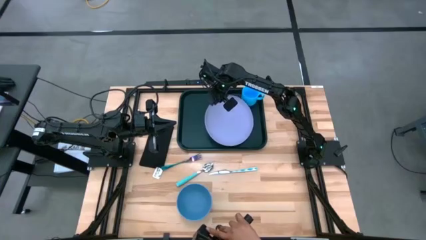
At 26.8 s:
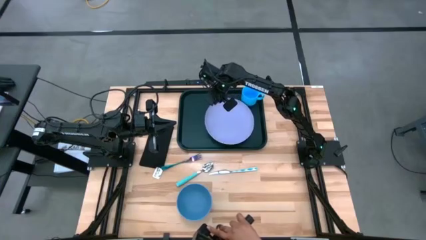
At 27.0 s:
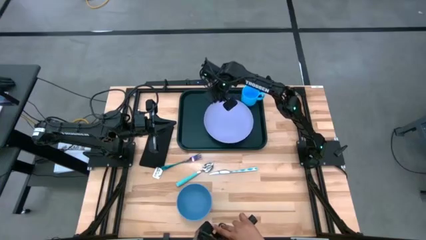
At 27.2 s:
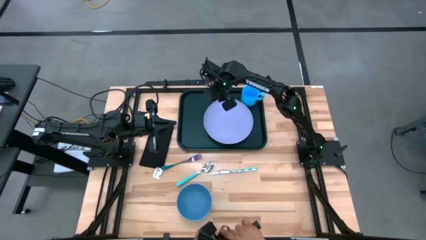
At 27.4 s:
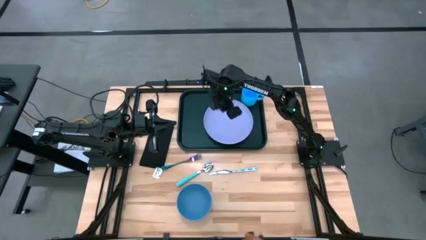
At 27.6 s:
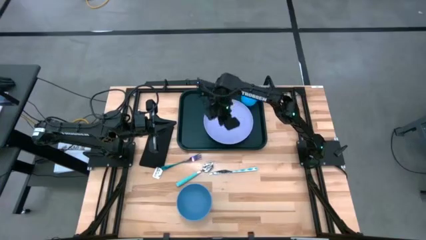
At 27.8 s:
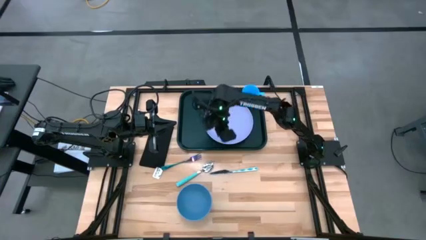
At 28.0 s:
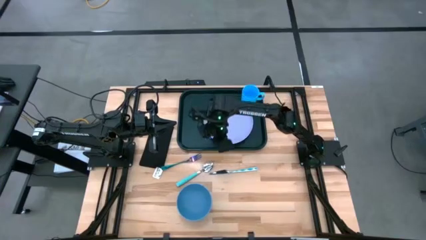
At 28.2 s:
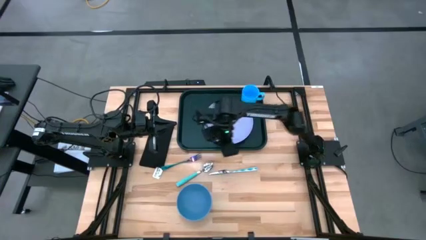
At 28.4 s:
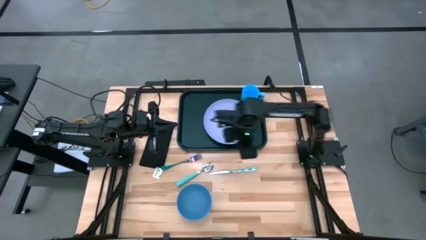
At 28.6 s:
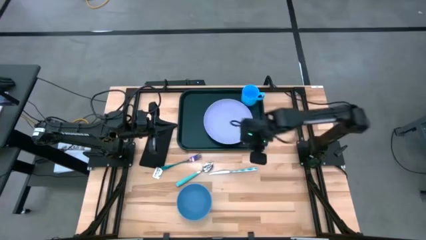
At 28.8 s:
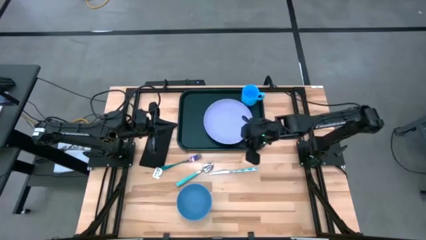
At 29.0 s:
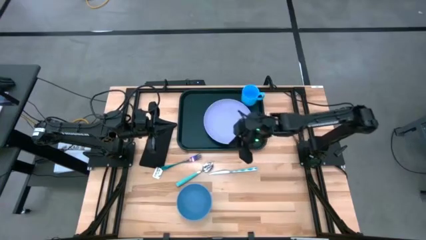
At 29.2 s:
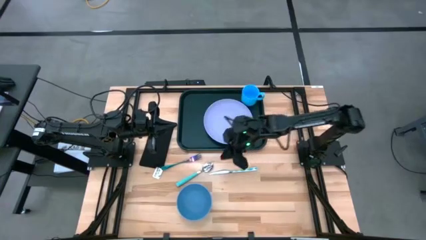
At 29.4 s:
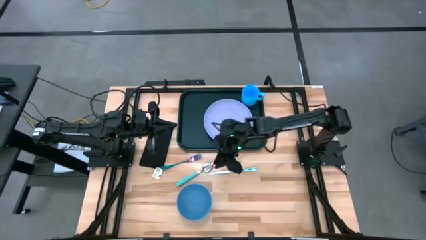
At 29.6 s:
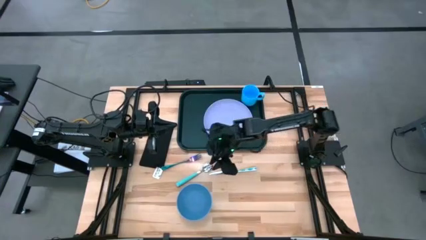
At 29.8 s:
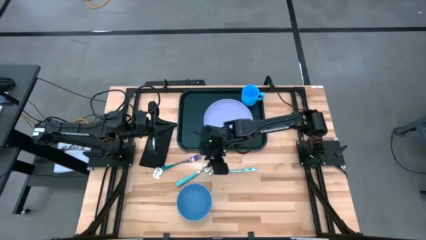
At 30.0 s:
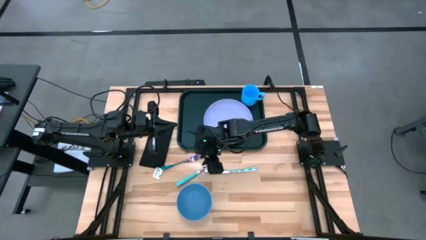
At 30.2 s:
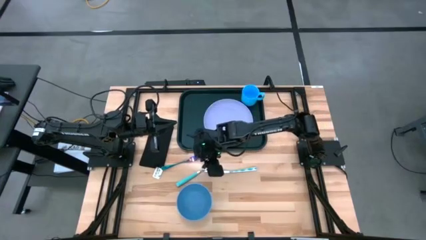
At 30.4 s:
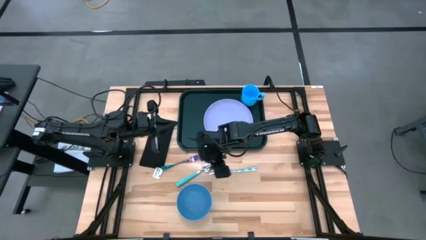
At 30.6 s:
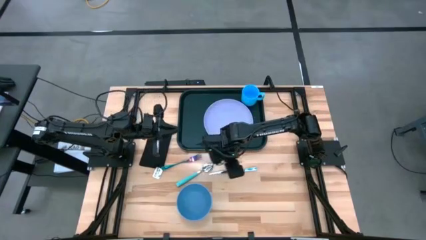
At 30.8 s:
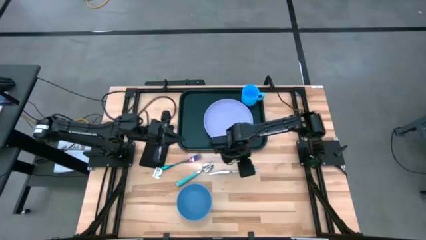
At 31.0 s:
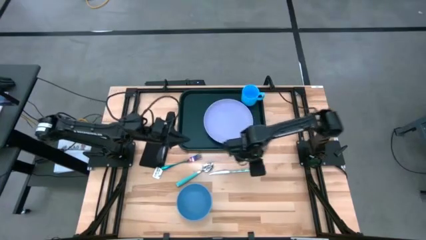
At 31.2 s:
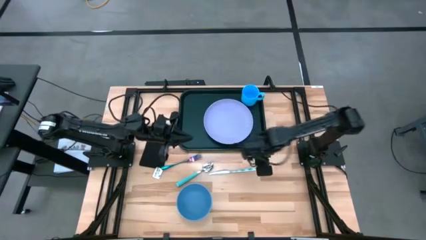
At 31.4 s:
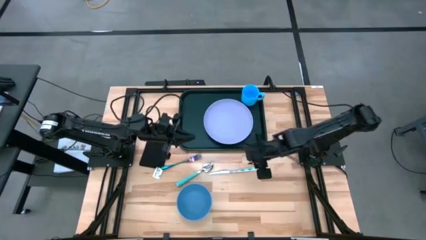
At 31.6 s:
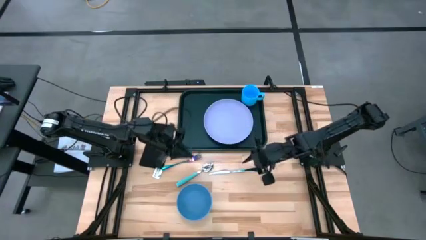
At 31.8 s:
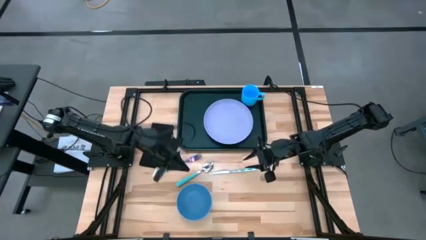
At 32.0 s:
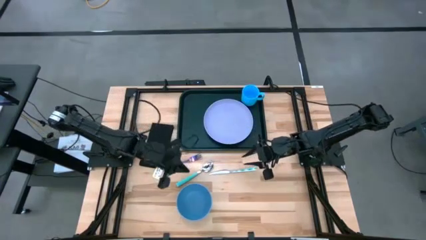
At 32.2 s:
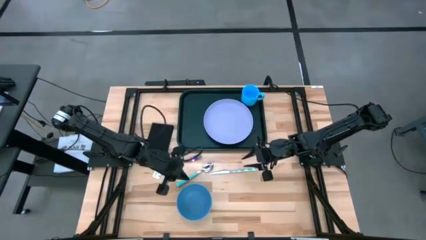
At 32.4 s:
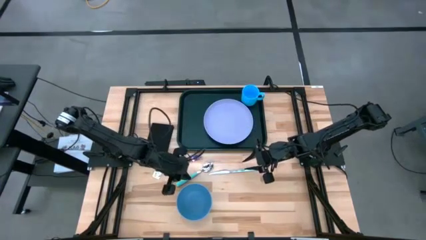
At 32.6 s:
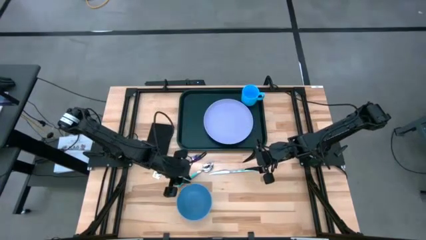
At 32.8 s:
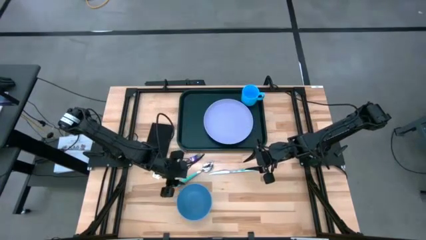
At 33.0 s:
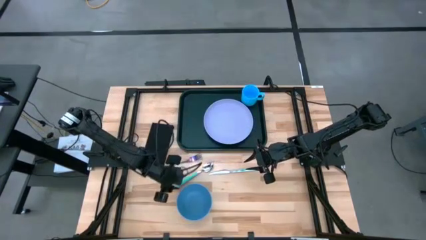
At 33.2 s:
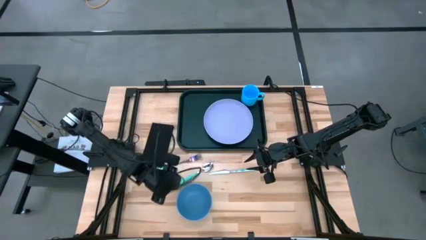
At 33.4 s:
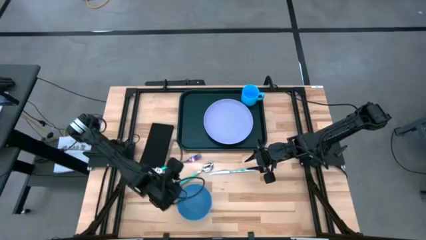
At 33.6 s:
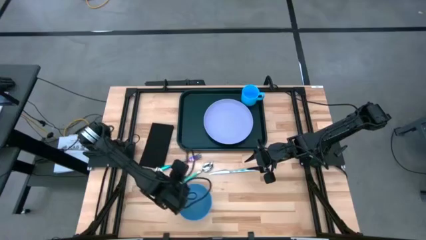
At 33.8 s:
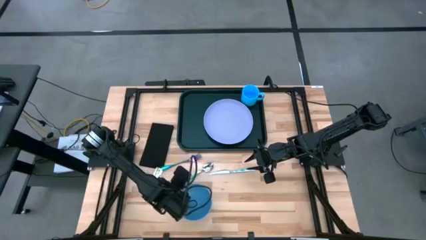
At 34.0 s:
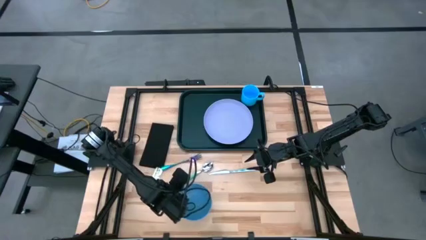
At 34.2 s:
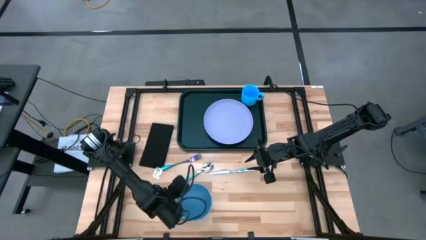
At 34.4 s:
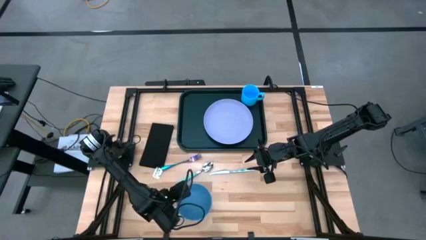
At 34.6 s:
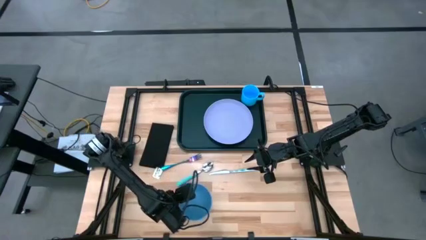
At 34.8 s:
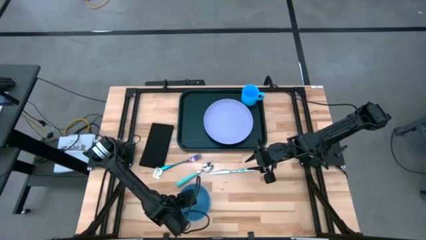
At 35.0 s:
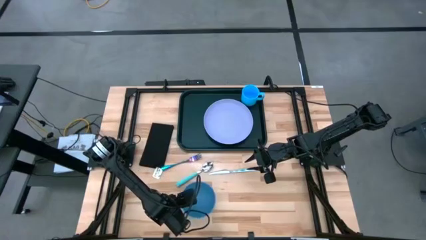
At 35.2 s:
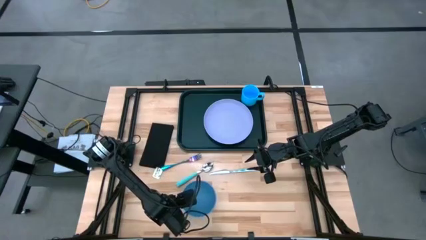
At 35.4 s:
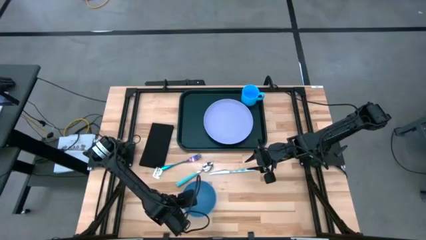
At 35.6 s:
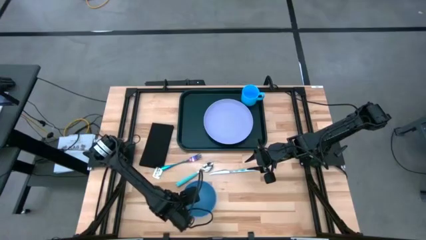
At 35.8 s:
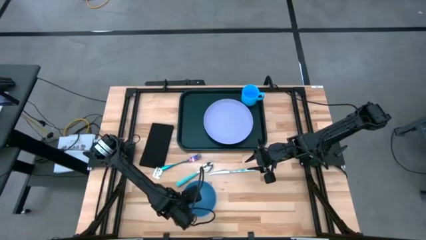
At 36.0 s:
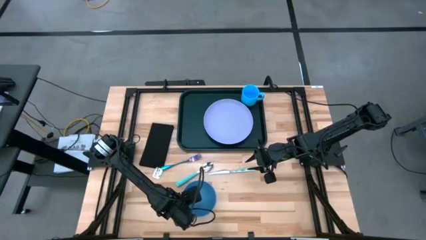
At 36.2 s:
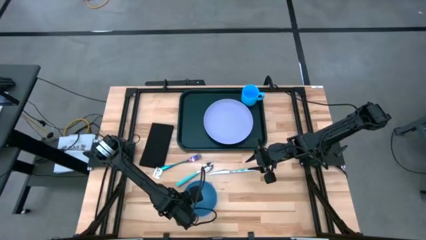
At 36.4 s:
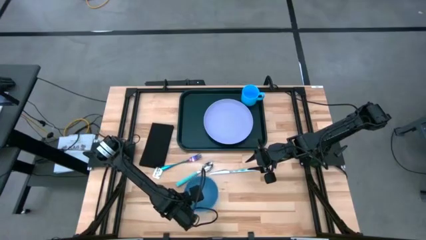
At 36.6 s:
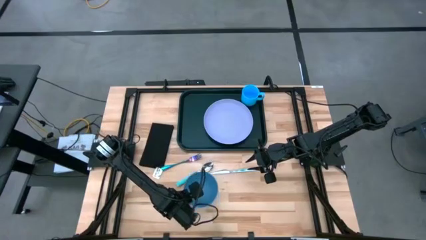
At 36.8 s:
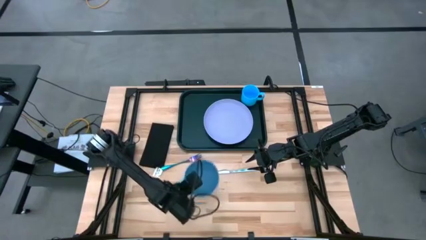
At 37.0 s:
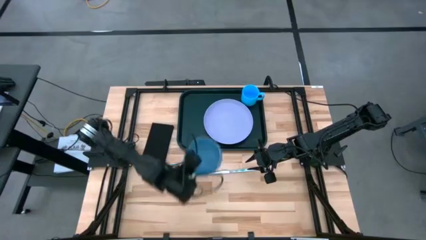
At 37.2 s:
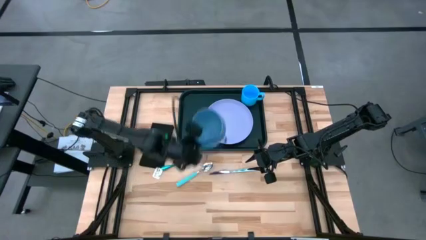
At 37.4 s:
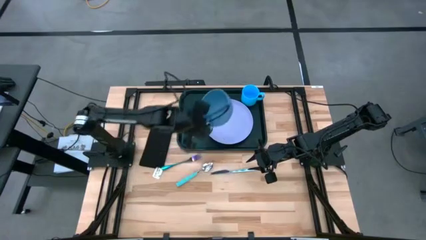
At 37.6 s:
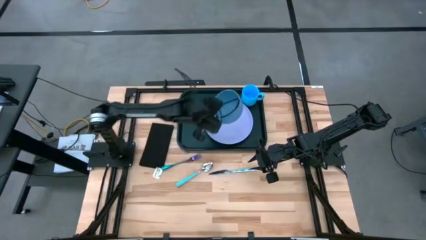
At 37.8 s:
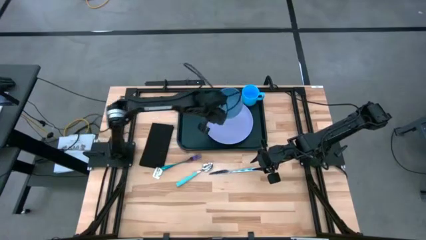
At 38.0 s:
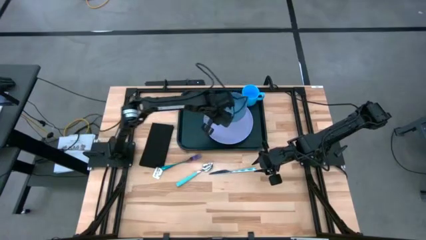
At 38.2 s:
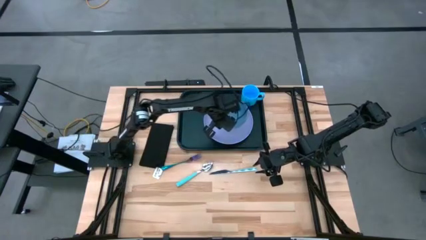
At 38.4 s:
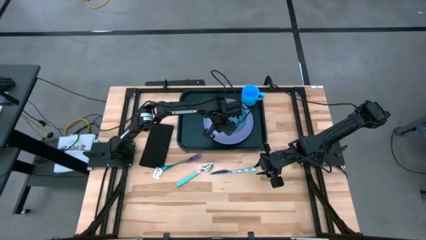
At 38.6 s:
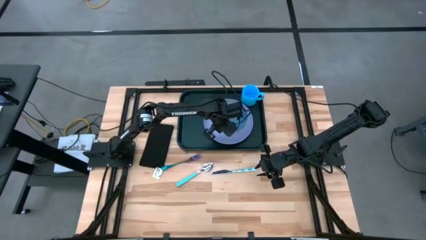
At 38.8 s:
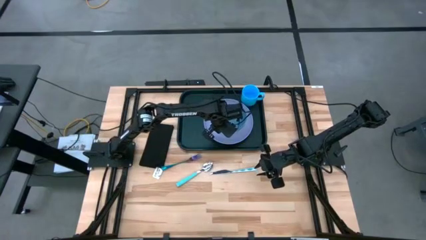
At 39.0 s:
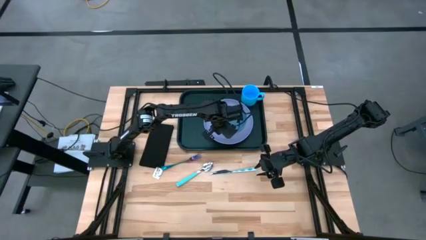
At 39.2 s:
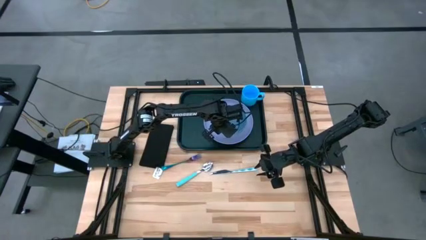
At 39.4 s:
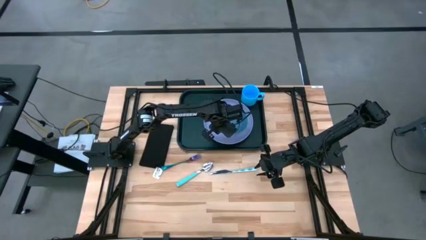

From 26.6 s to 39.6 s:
Task: Set up tray
Put the bowl on top of the purple plate on the black serving tray

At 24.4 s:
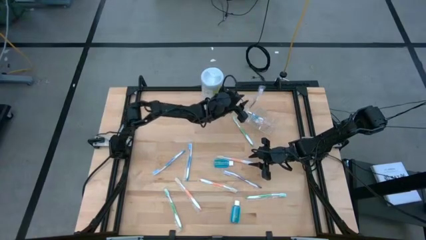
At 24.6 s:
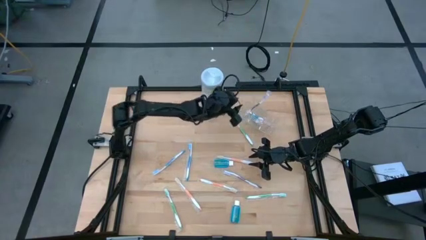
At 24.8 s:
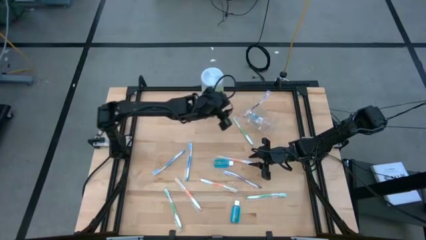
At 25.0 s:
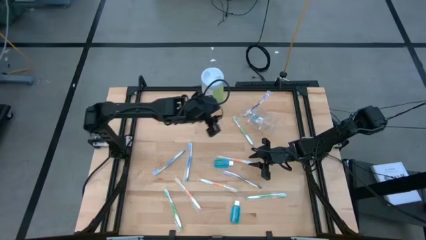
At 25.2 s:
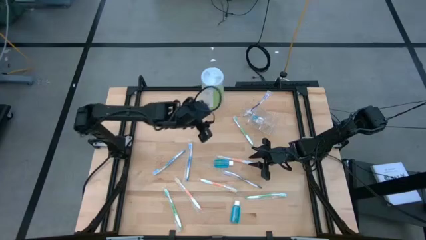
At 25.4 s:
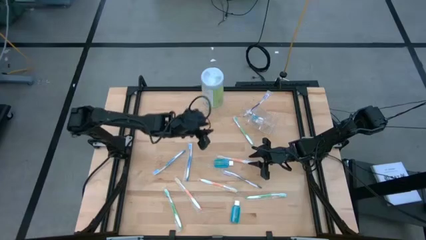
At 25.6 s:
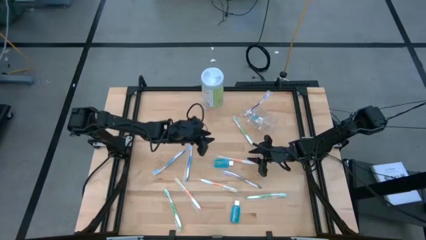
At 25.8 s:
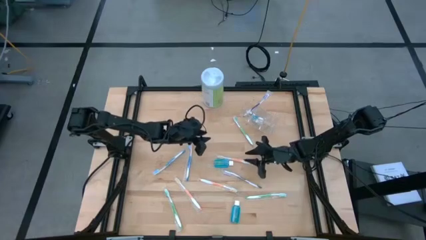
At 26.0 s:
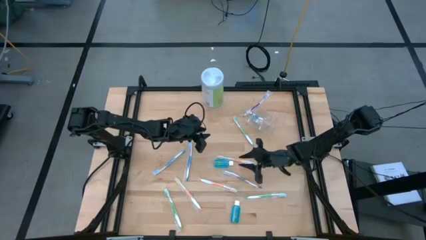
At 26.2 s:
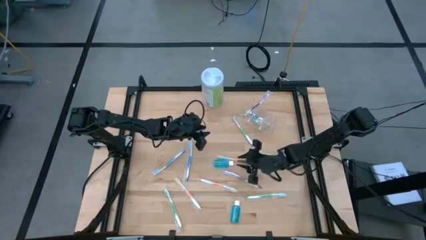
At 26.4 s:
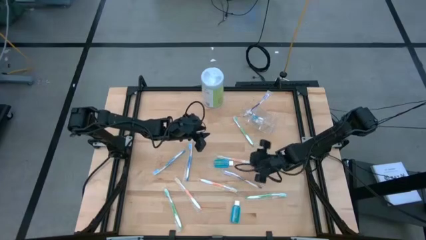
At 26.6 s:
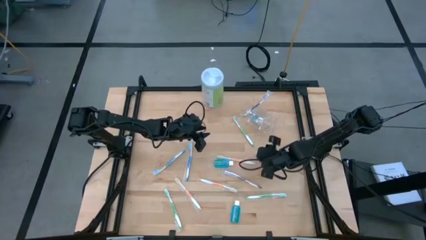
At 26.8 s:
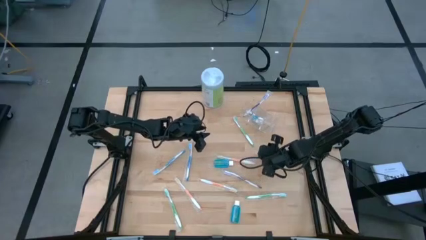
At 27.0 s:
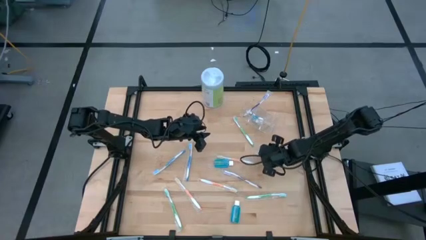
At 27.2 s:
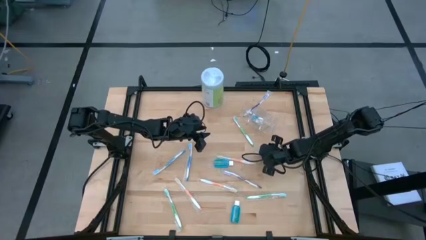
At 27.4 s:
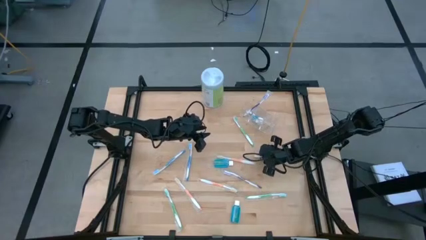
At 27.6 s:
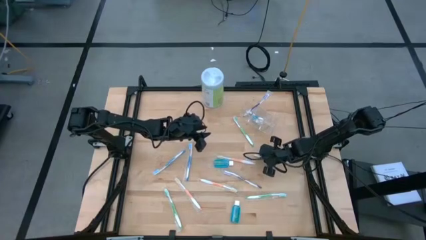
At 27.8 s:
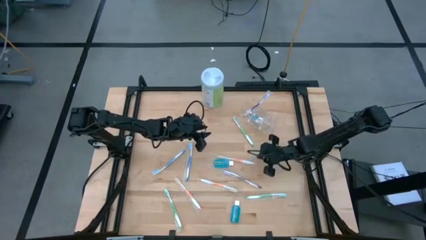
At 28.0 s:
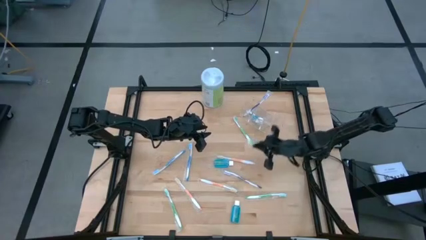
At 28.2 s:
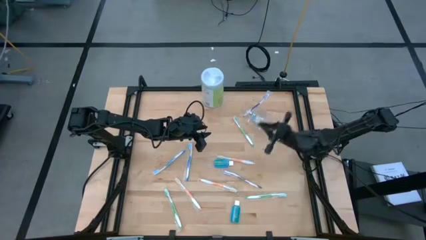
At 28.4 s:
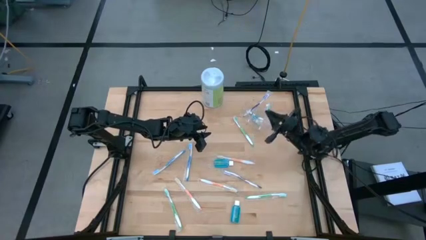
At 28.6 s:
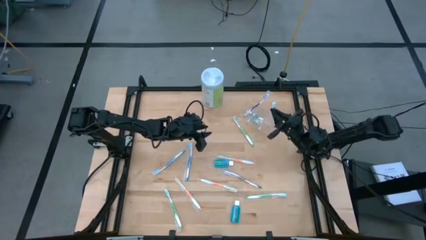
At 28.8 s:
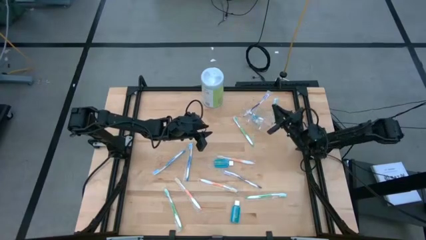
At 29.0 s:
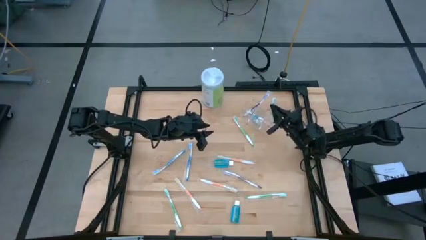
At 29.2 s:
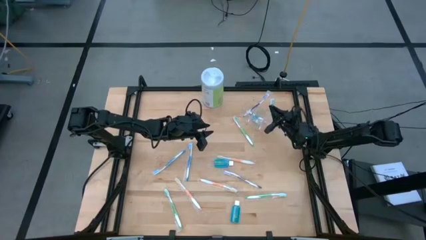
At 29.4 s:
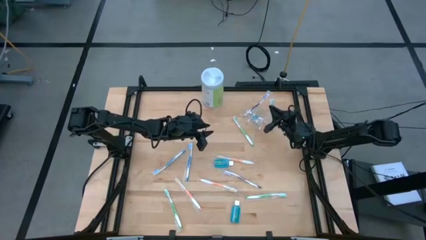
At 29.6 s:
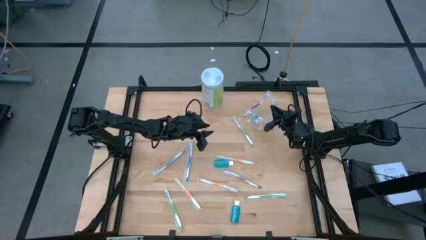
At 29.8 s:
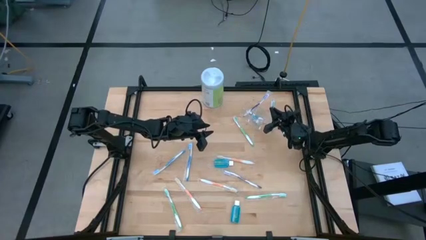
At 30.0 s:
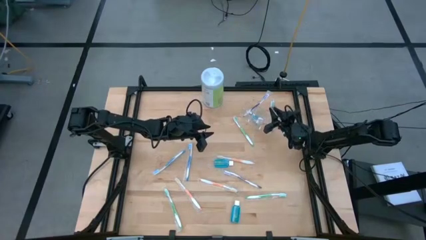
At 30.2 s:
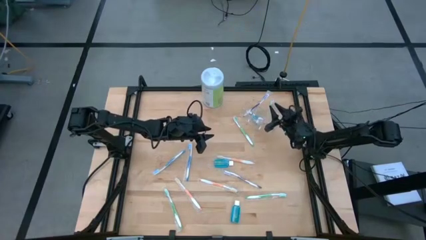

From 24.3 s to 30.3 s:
Task: Pick & Place toothbrushing station
Put the green toothbrush into the transparent organizer
